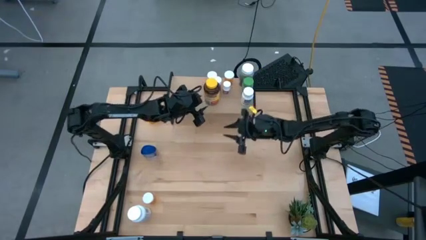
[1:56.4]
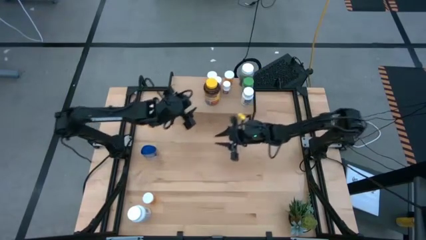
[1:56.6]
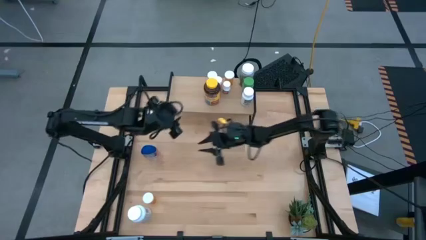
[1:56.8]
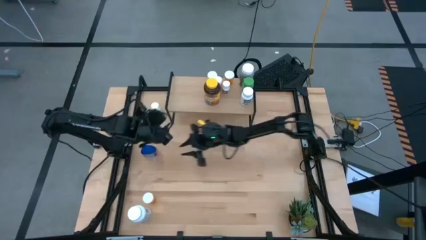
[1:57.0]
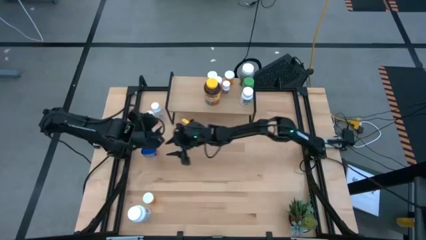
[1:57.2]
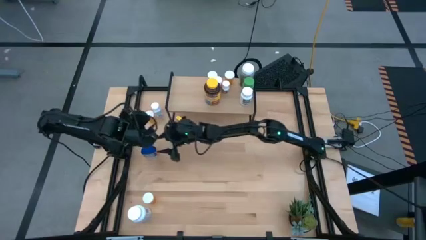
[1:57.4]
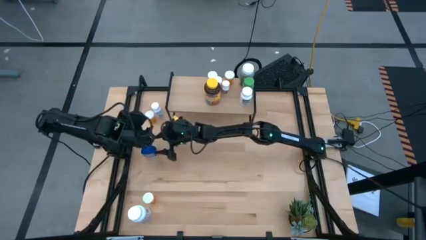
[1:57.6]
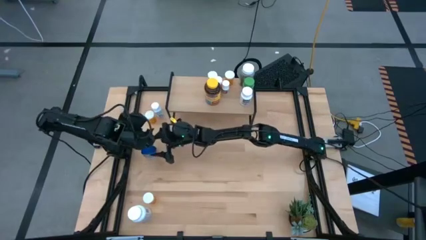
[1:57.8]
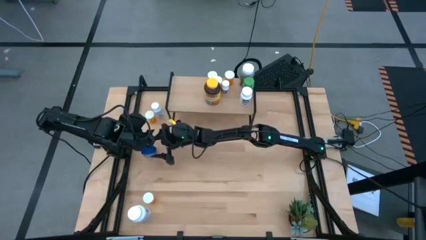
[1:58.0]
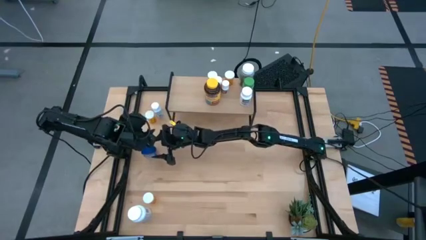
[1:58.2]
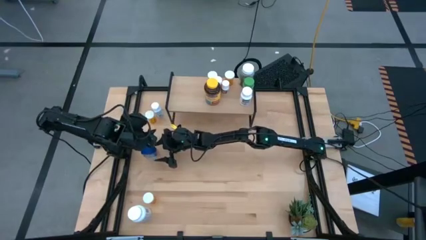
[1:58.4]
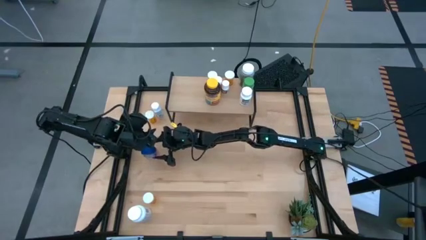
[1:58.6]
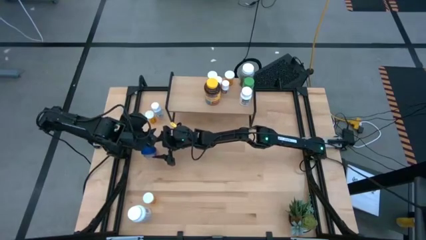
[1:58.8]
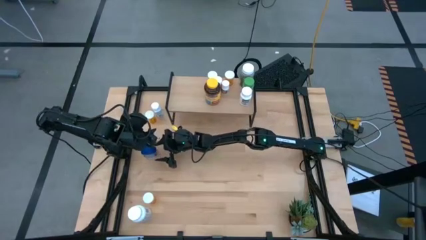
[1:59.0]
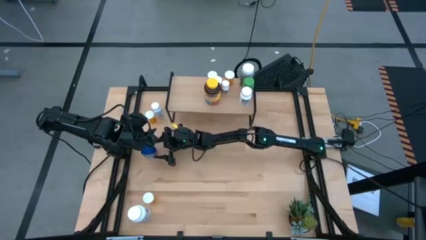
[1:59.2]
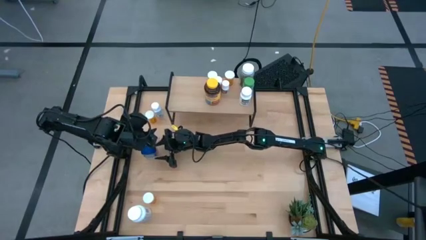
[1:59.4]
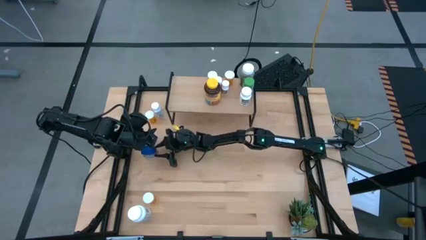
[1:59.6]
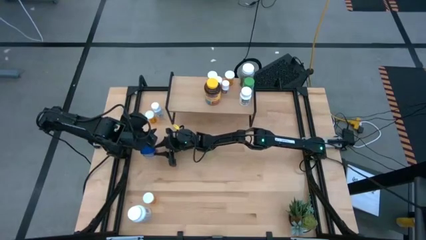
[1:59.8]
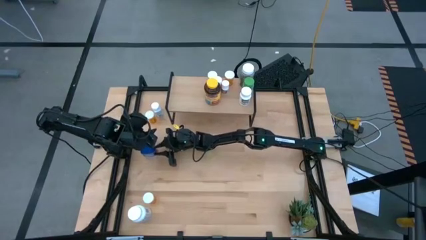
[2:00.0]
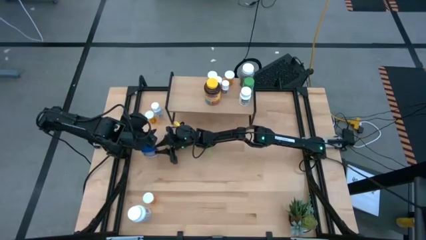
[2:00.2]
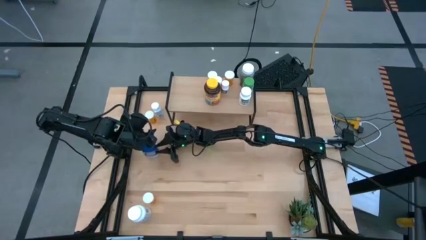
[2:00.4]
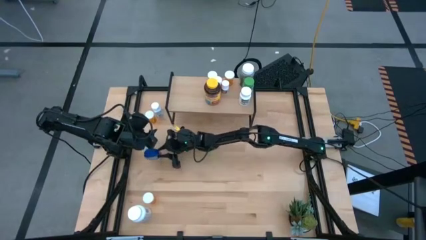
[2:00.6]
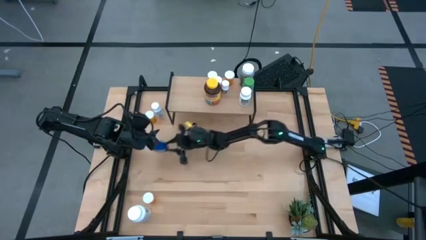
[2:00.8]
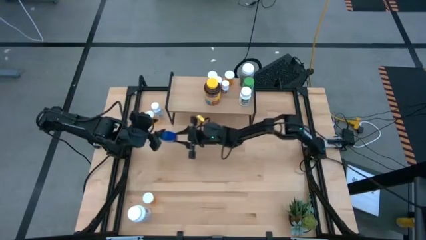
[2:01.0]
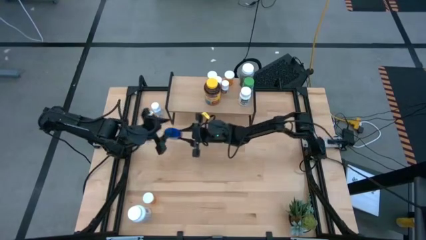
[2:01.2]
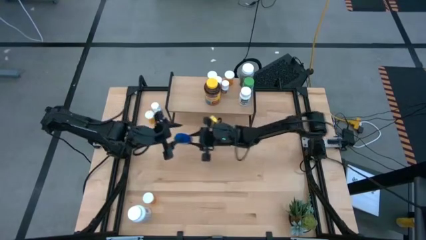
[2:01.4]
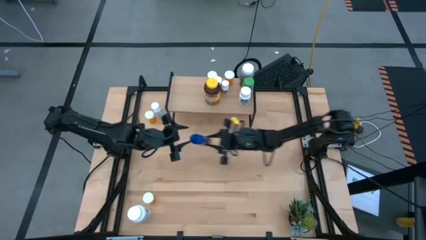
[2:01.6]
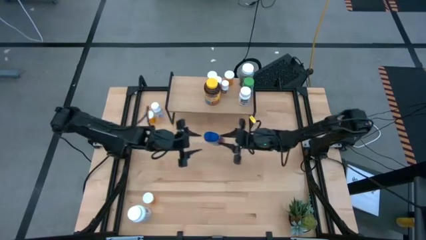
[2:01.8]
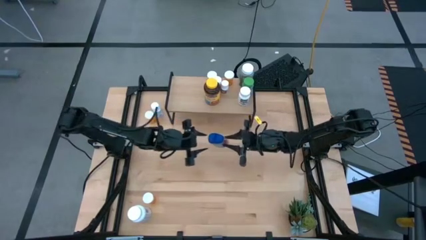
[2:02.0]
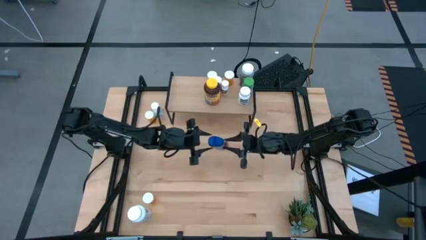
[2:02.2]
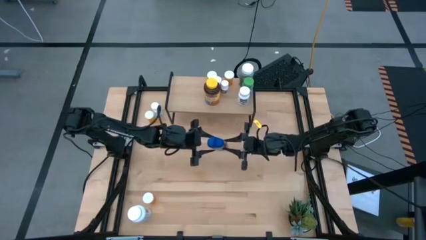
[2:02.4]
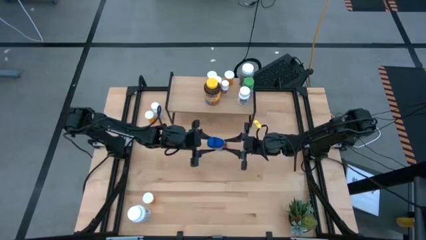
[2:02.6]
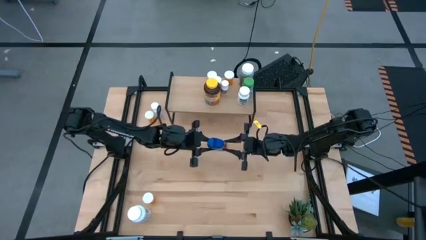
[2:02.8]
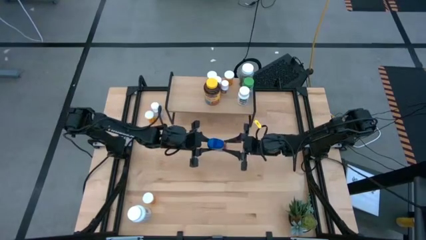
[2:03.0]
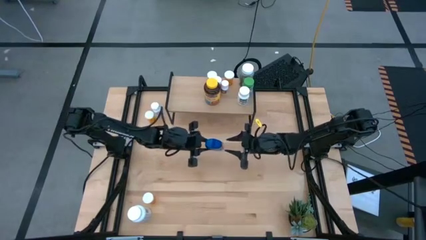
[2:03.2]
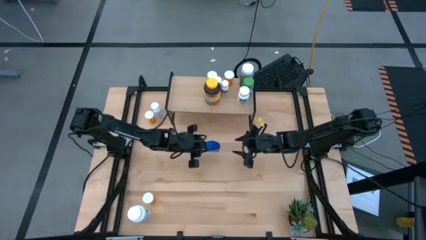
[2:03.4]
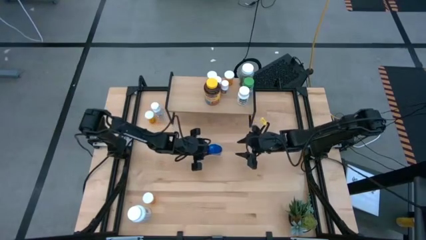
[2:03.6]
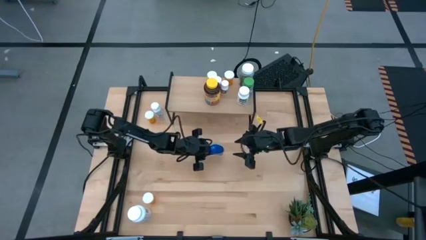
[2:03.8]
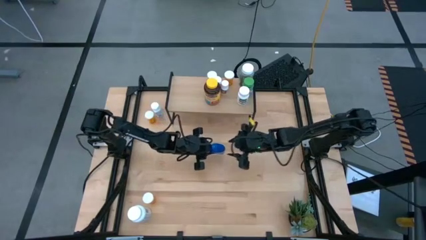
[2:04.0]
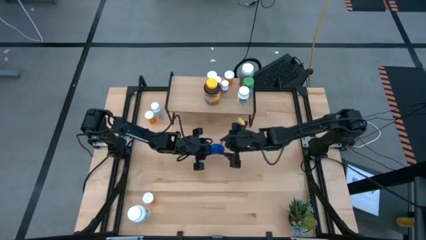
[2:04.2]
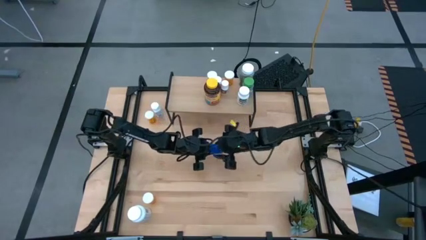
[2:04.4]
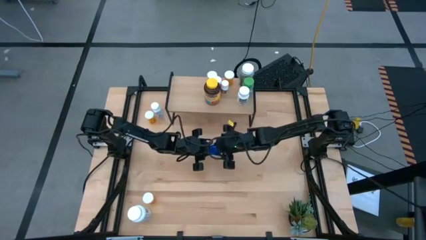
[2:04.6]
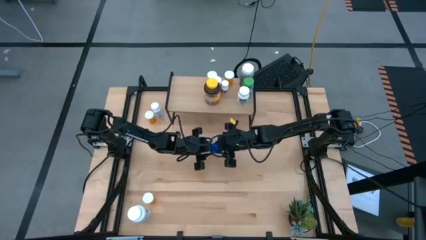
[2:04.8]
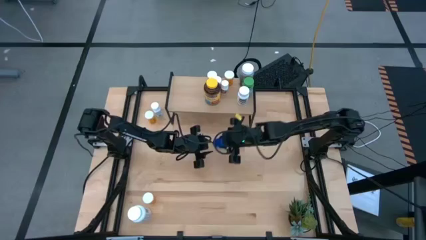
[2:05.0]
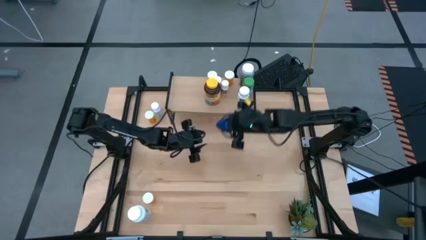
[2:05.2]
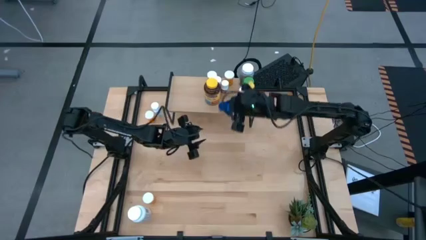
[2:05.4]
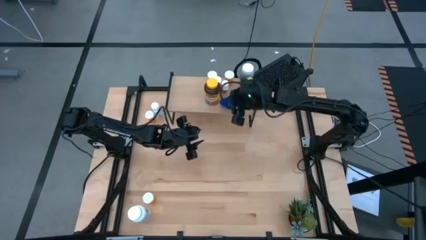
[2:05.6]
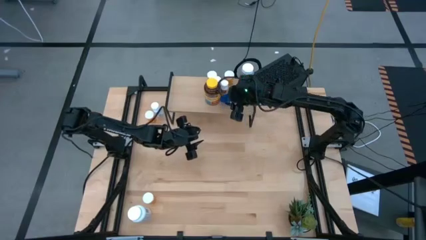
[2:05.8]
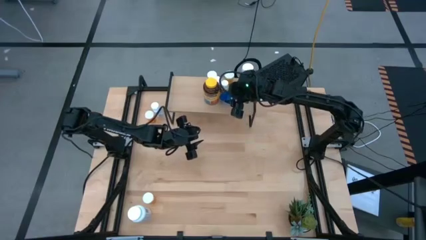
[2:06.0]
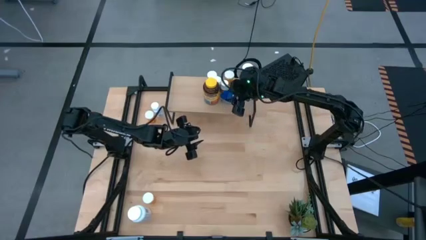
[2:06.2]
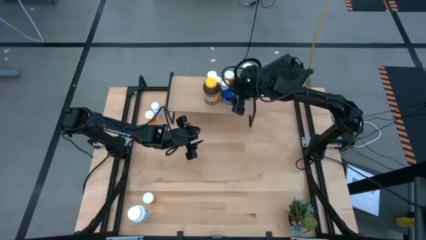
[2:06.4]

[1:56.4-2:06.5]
Task: Pick and place medicine bottles onto shelf by color
Put the blue pill bottle on the shelf
